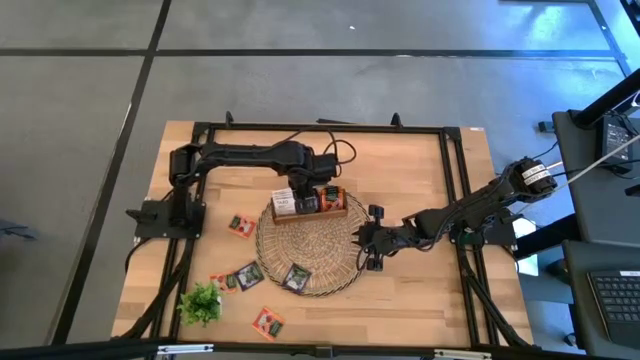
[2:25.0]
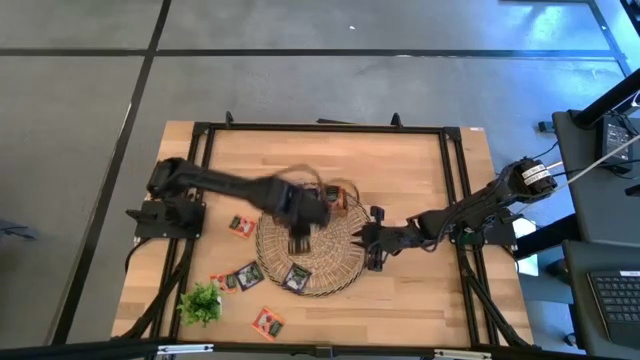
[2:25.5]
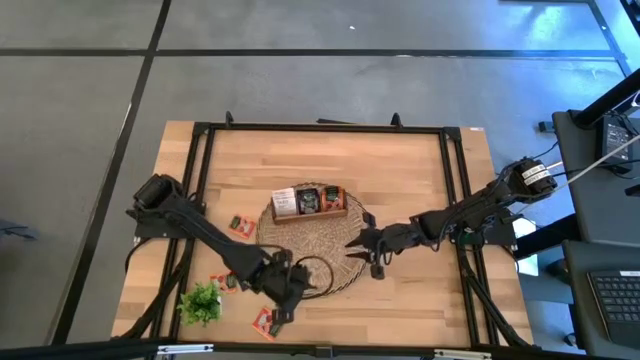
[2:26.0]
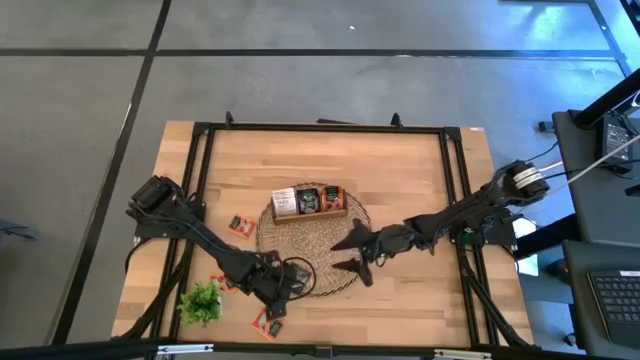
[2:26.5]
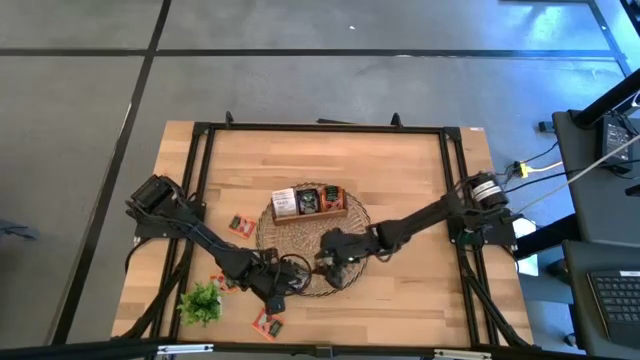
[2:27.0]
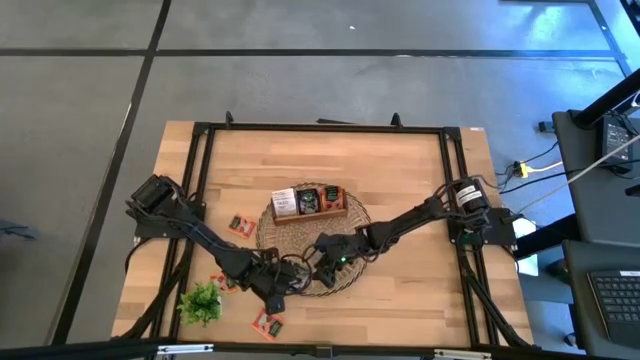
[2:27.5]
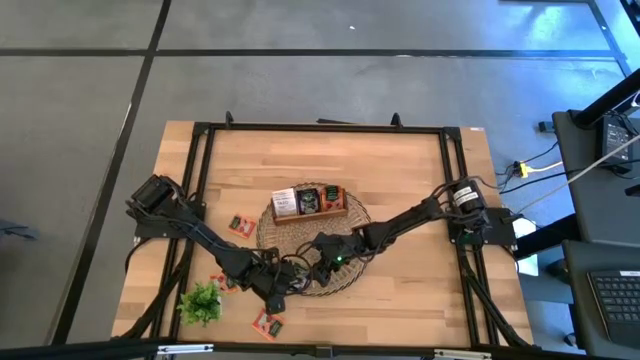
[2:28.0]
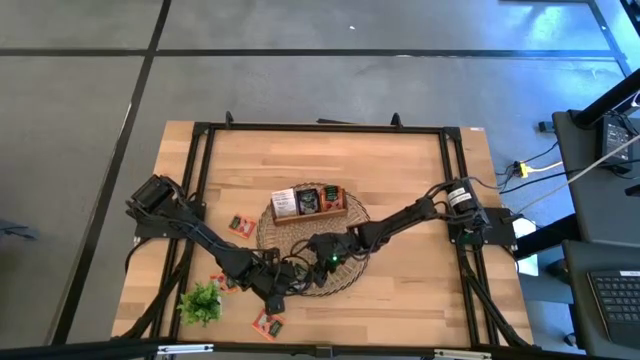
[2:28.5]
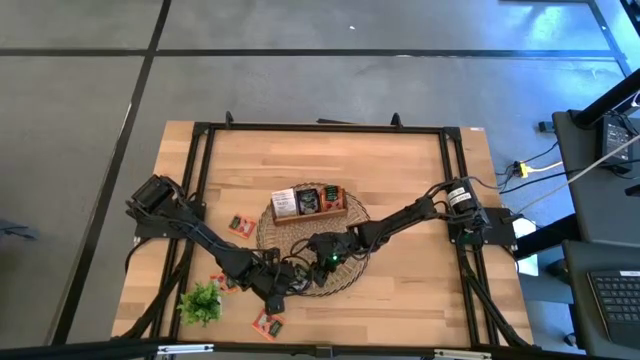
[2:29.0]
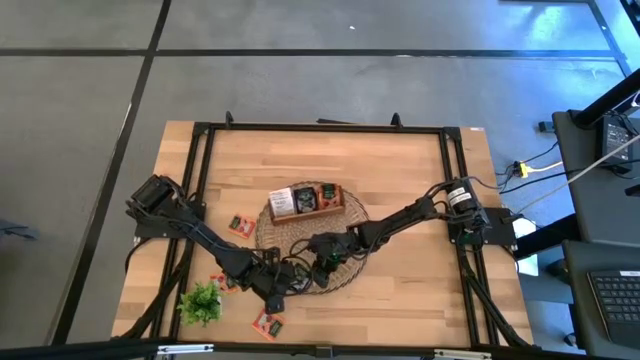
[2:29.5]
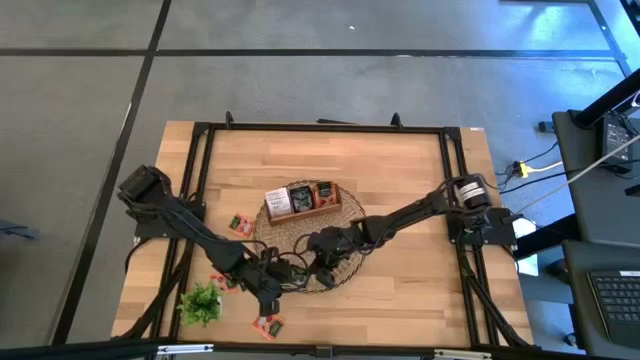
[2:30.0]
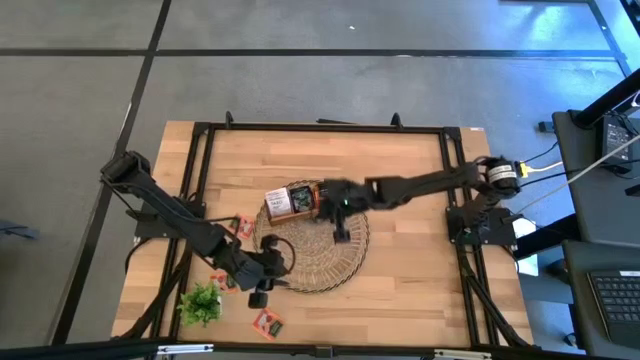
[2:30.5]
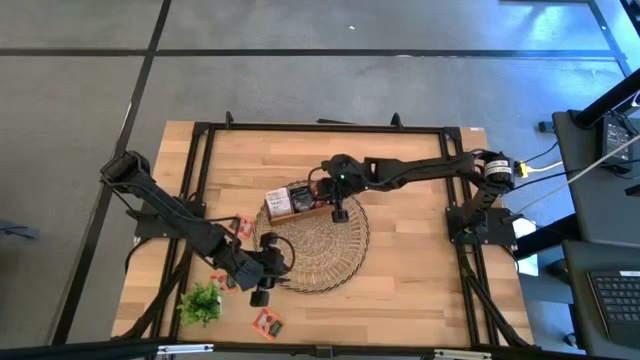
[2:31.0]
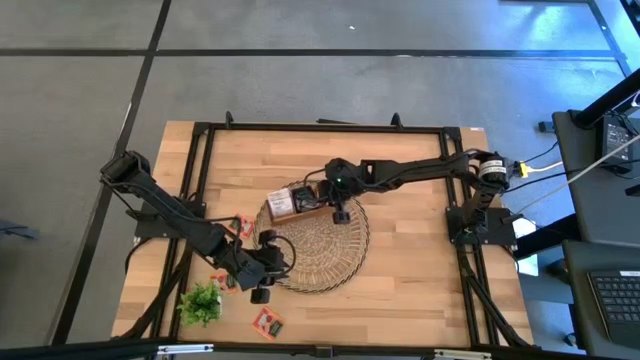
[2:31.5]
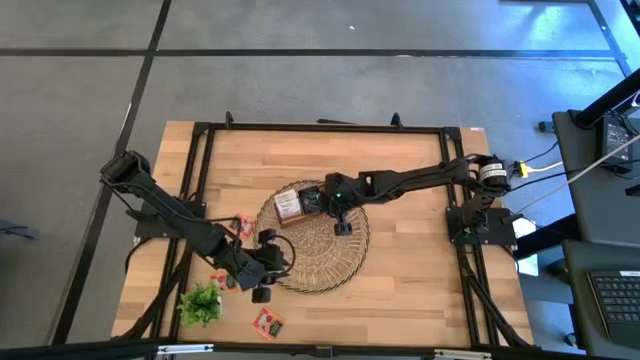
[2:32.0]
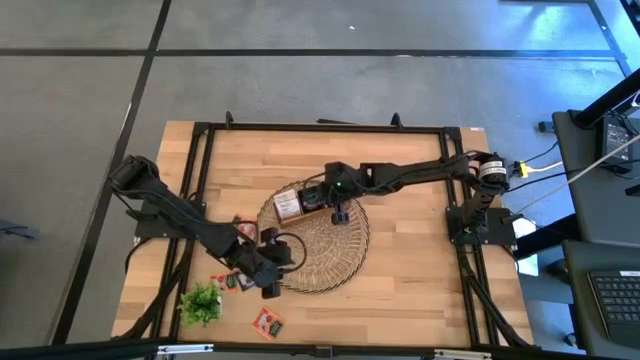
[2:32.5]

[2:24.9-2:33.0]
Task: Pick & Place Tea
Put the right violet tea bag into the middle slot of the wooden organizer

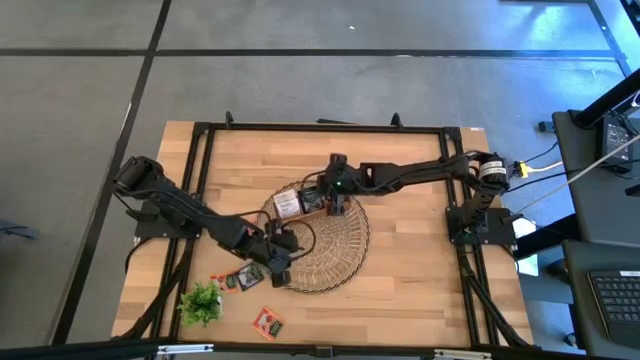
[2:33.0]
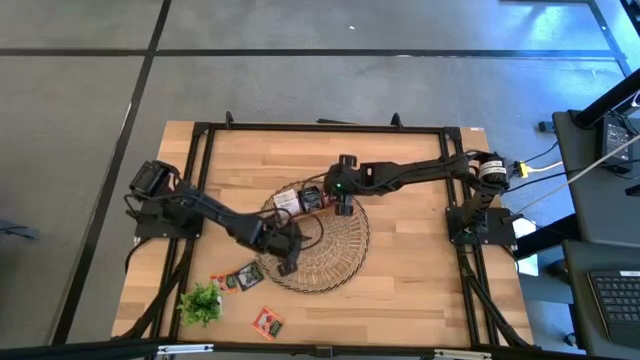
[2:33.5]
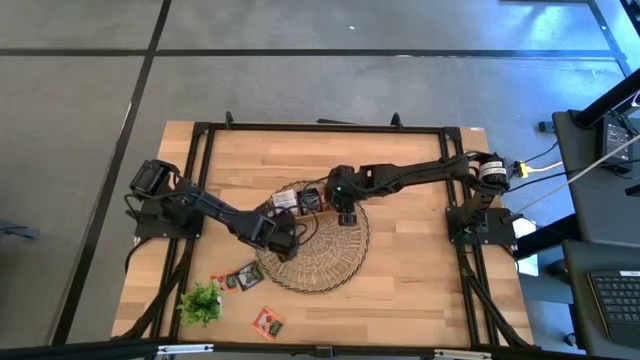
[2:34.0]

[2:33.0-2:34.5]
Adjust the wooden organizer on the table

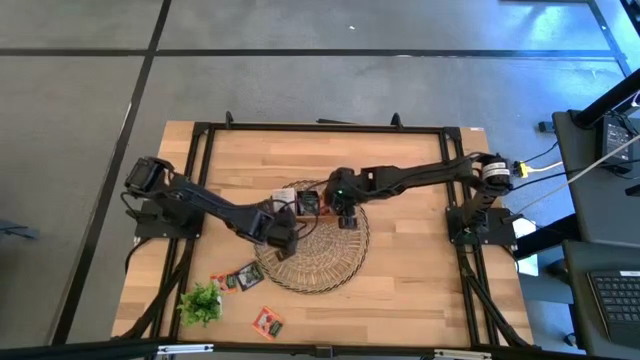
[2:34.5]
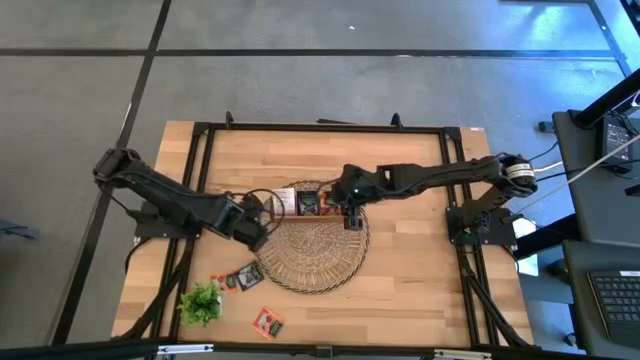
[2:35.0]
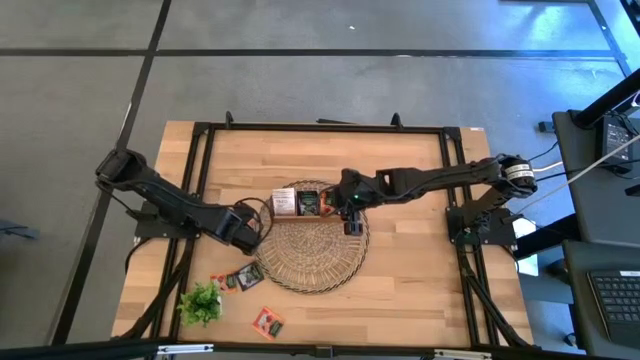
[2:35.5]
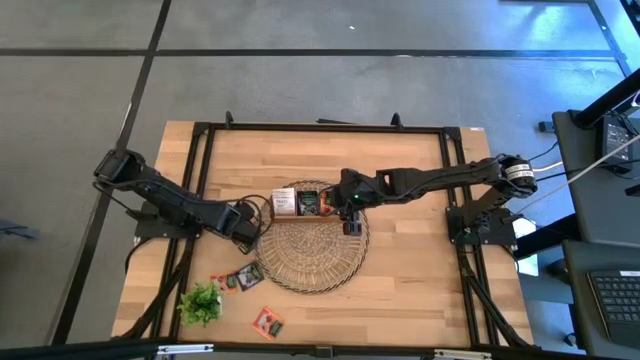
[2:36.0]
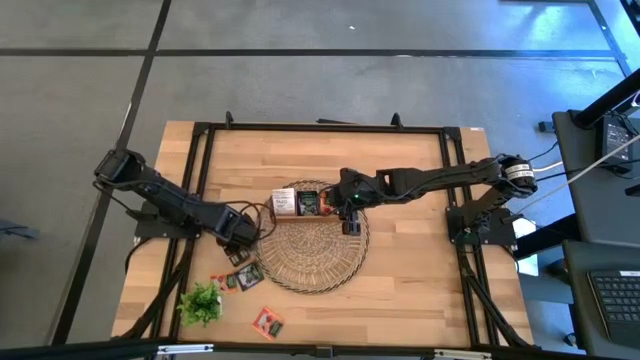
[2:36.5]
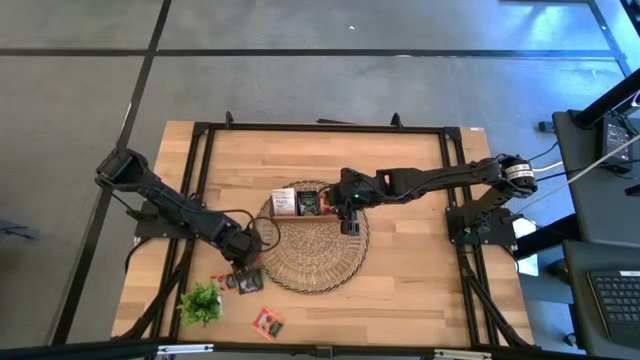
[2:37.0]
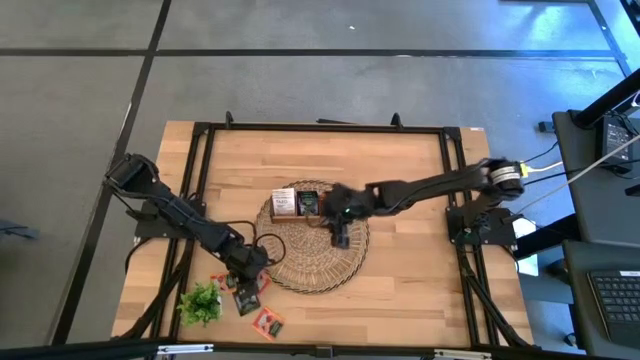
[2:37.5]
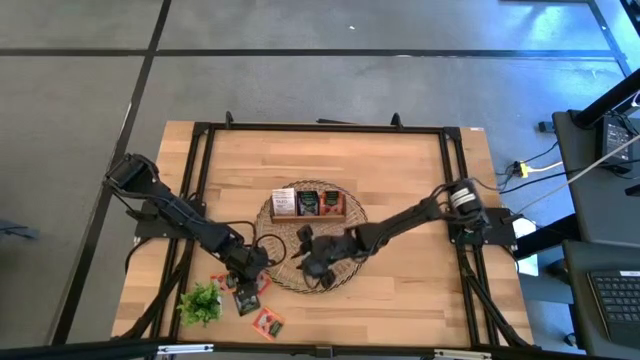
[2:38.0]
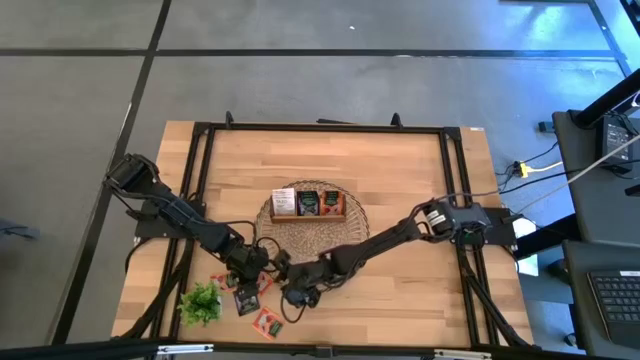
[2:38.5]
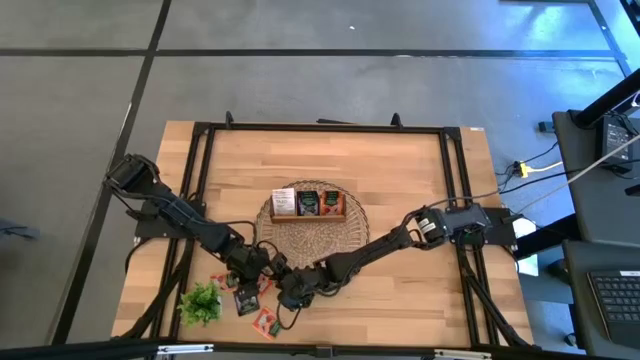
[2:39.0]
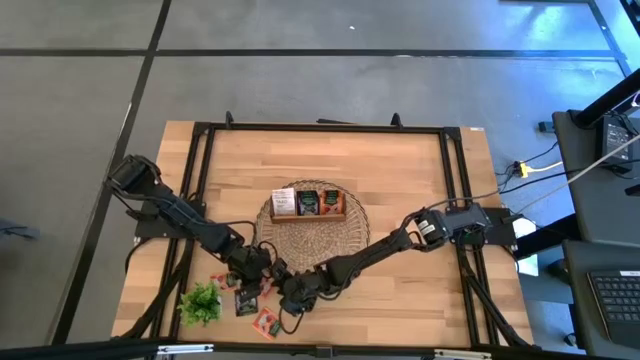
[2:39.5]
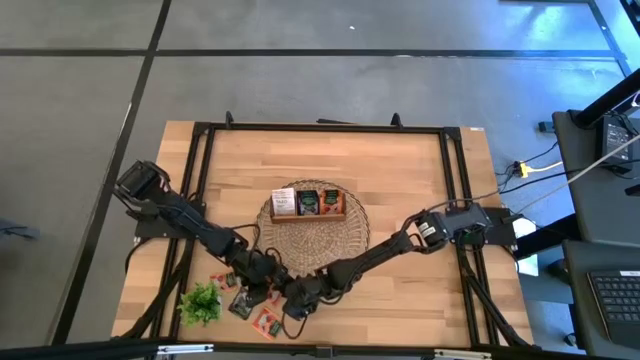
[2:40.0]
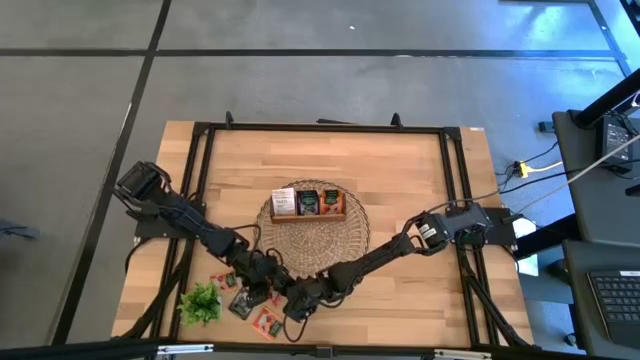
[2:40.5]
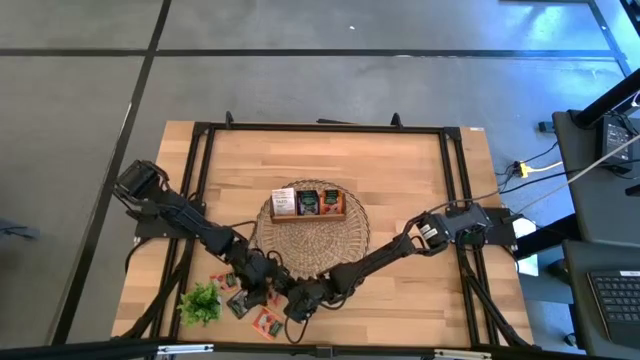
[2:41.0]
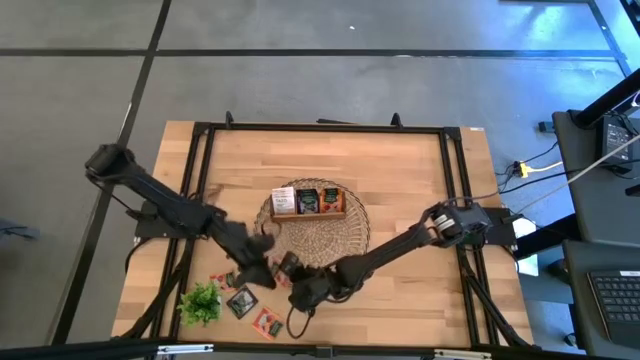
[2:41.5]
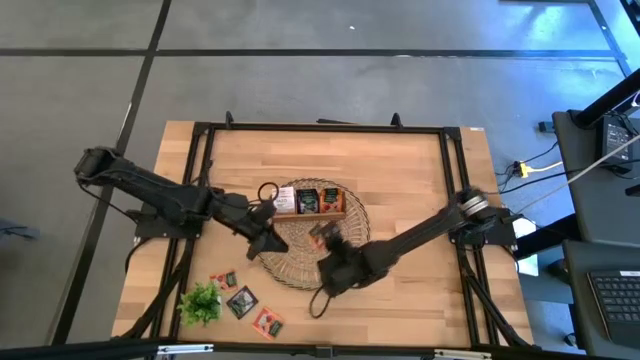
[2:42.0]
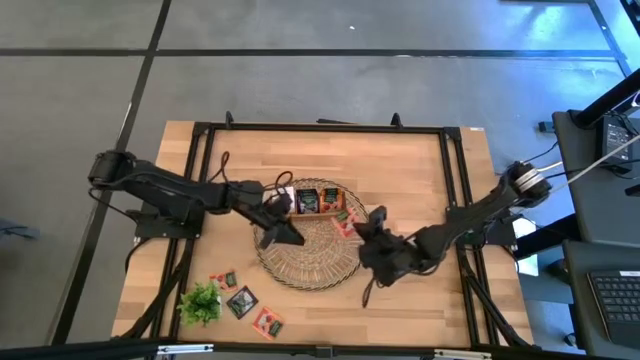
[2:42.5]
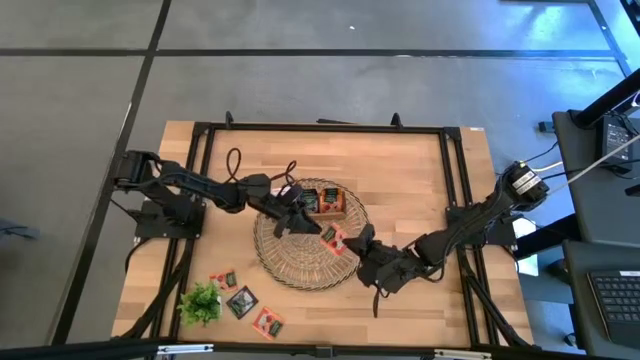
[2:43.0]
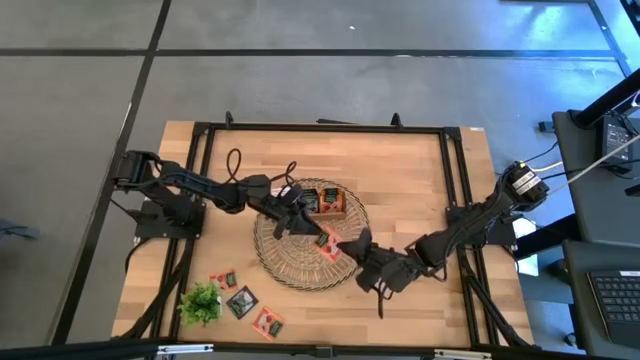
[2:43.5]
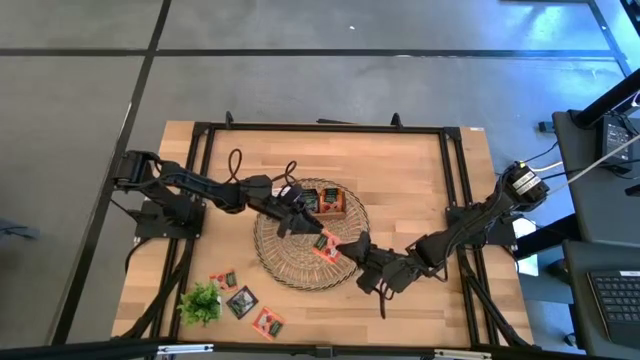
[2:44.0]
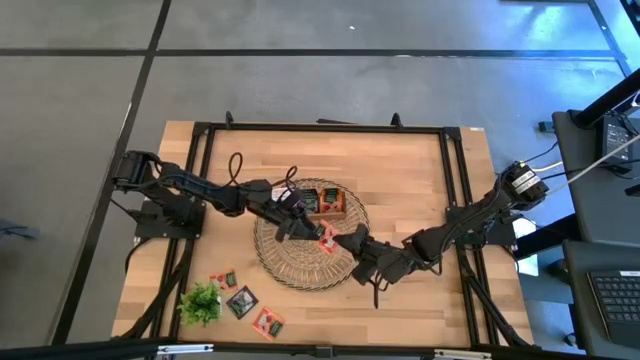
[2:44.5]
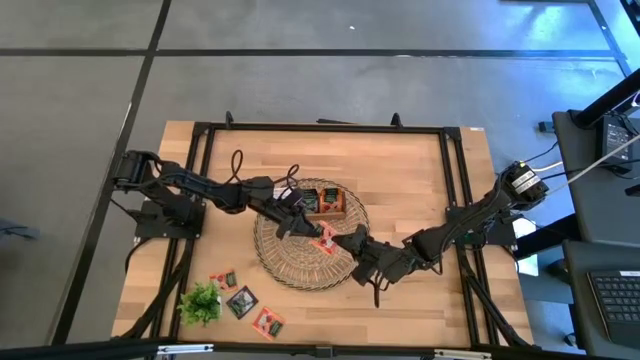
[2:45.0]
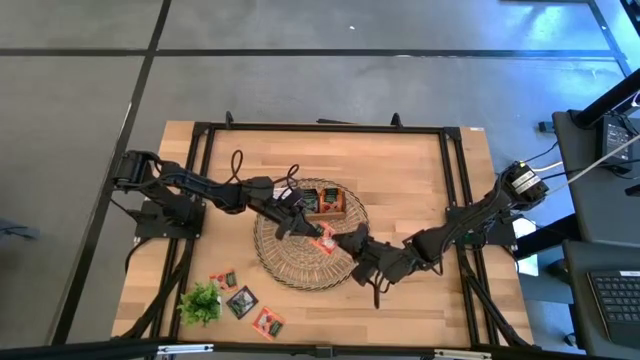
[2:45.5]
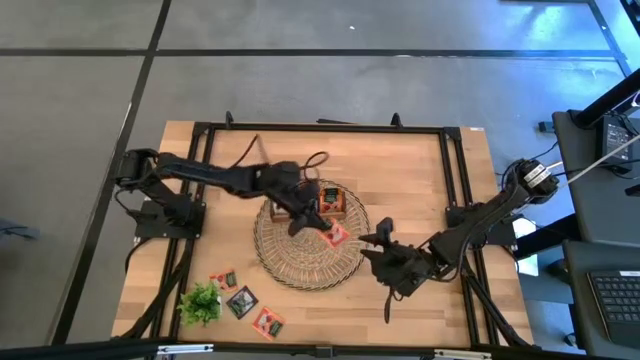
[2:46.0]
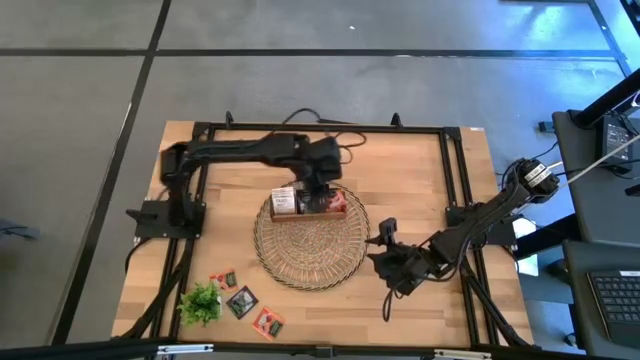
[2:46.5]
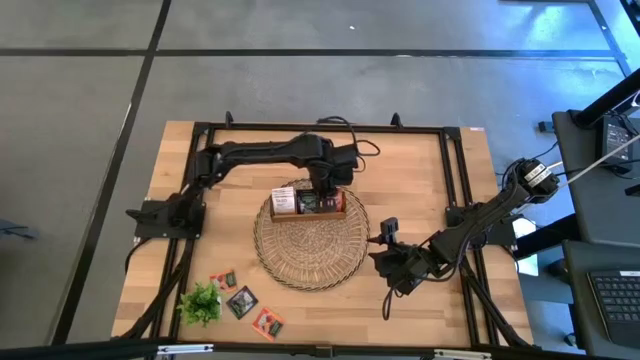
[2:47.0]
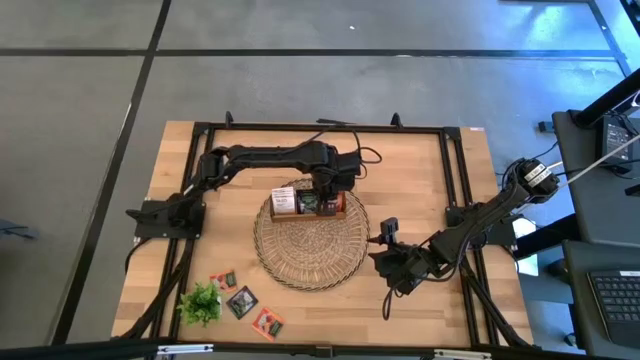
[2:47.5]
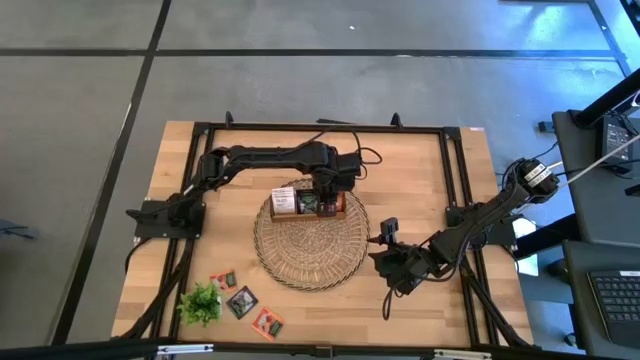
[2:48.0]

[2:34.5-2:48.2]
Put the top left orange tea bag into the right slot of the wooden organizer
